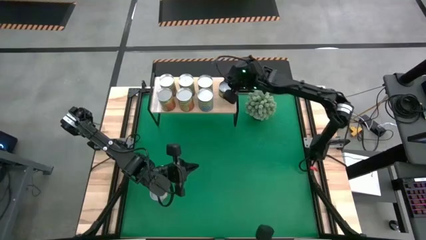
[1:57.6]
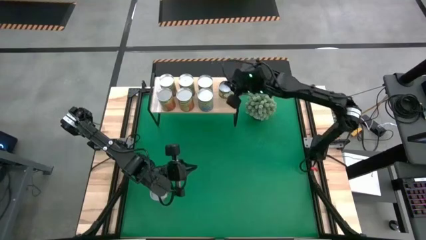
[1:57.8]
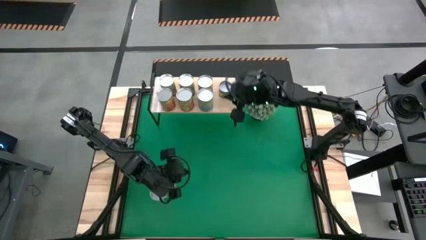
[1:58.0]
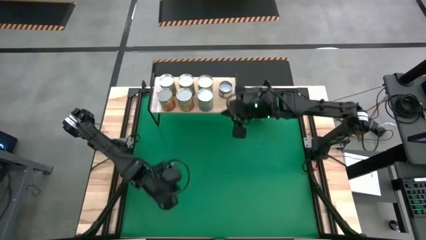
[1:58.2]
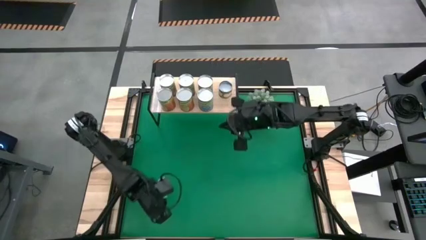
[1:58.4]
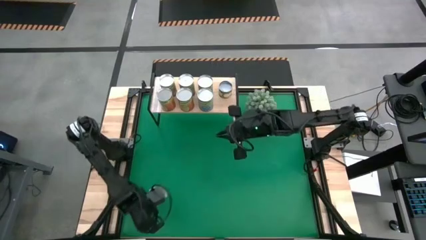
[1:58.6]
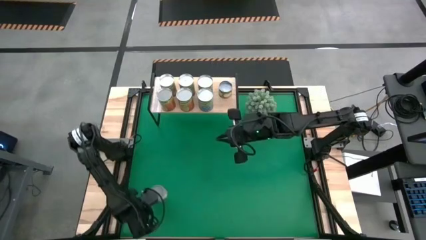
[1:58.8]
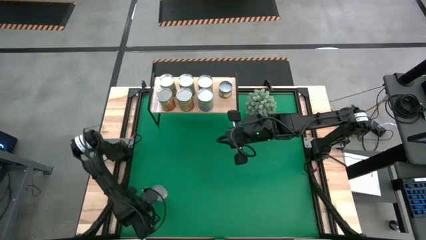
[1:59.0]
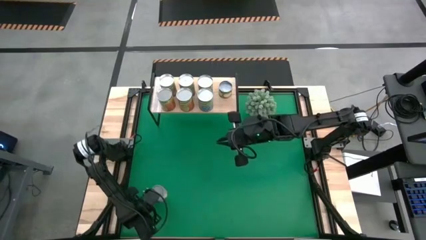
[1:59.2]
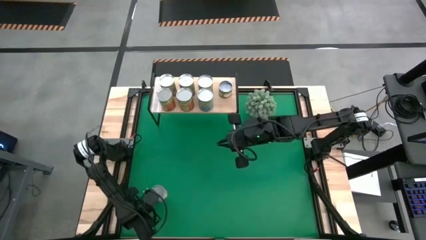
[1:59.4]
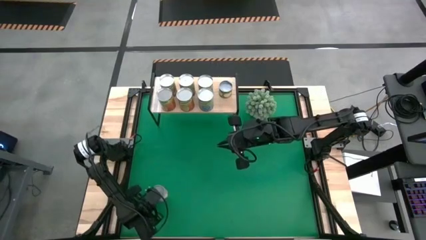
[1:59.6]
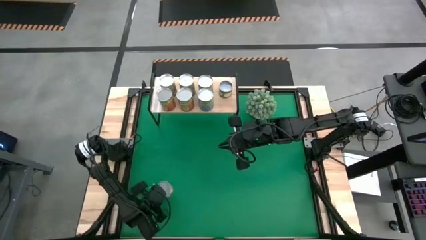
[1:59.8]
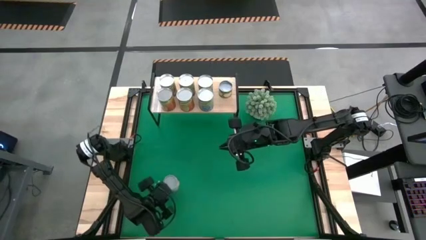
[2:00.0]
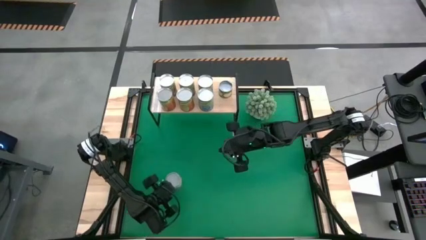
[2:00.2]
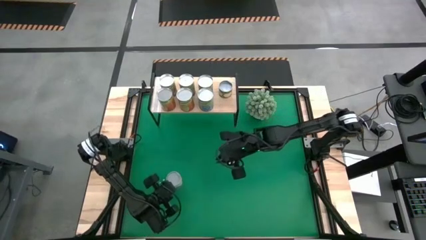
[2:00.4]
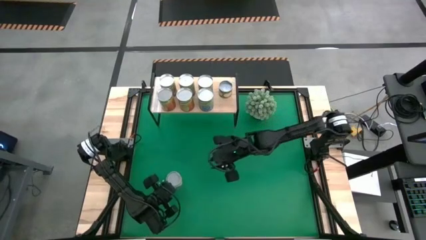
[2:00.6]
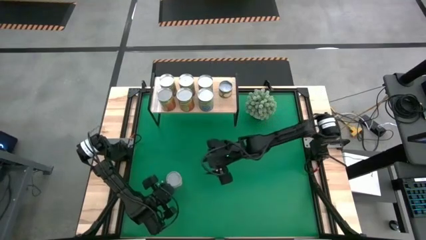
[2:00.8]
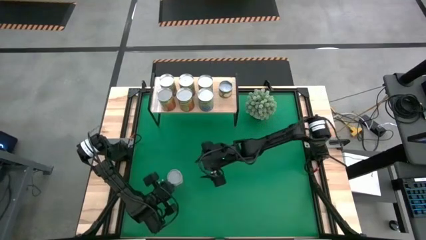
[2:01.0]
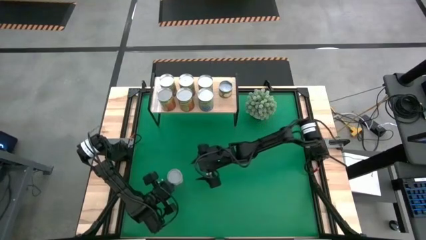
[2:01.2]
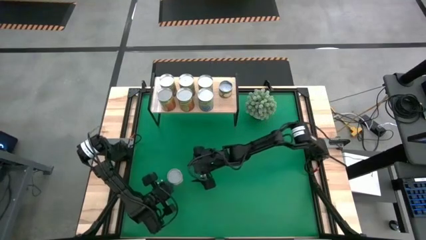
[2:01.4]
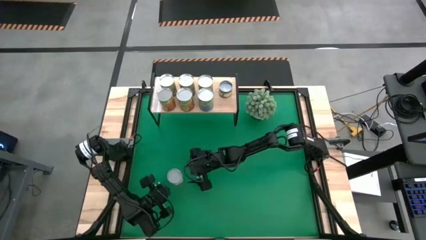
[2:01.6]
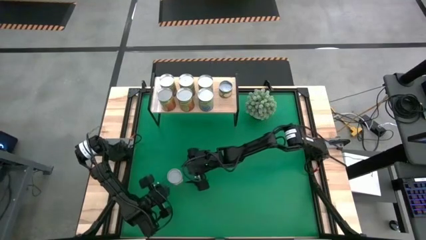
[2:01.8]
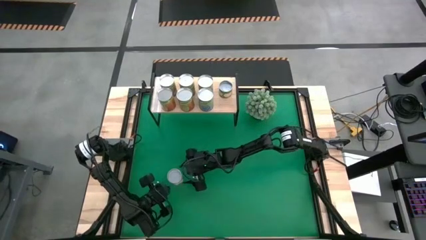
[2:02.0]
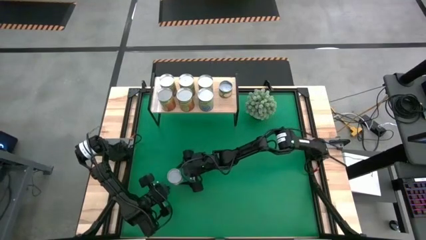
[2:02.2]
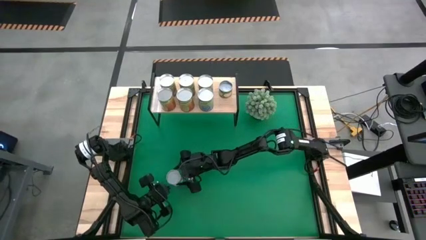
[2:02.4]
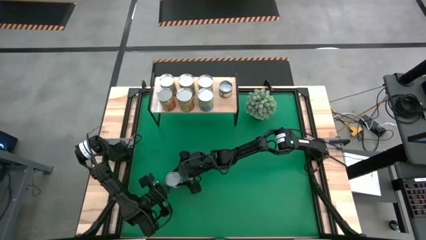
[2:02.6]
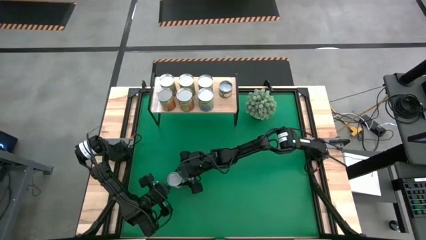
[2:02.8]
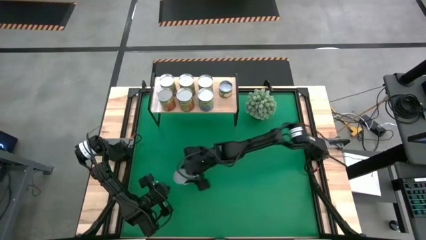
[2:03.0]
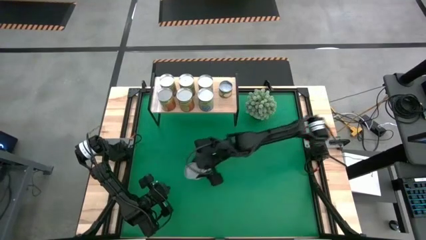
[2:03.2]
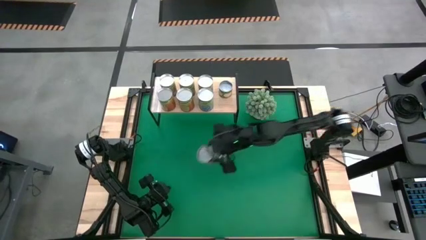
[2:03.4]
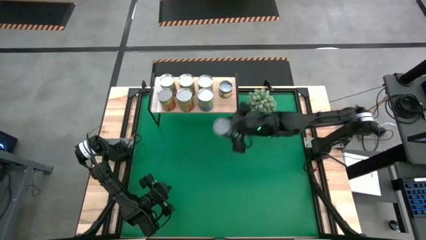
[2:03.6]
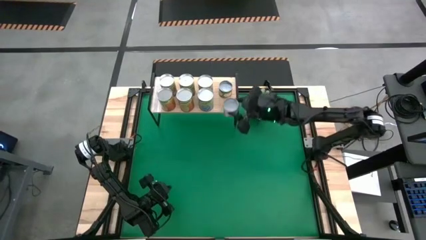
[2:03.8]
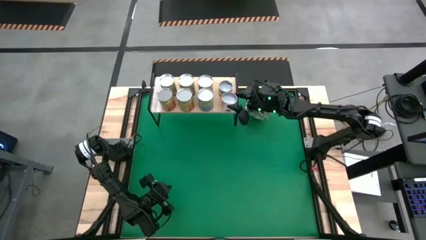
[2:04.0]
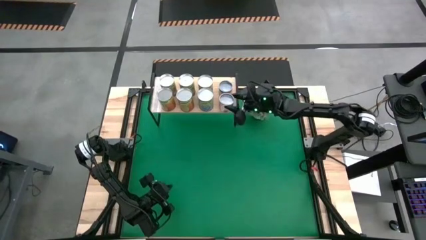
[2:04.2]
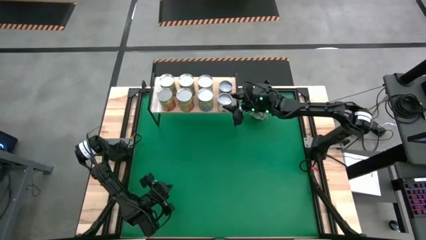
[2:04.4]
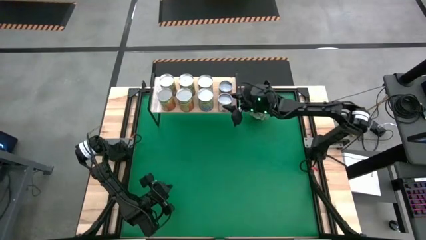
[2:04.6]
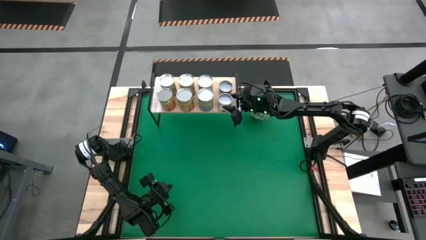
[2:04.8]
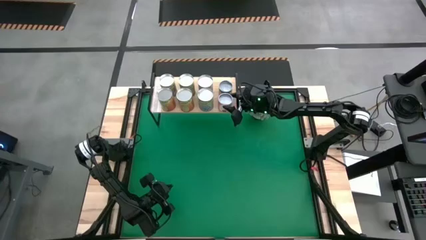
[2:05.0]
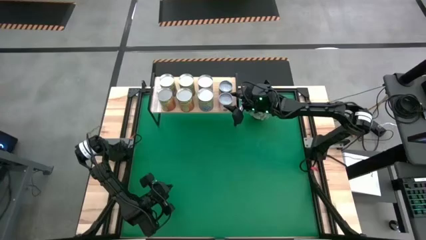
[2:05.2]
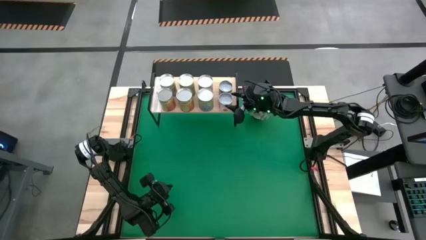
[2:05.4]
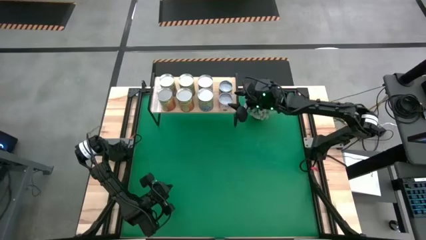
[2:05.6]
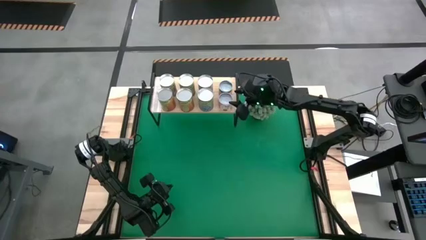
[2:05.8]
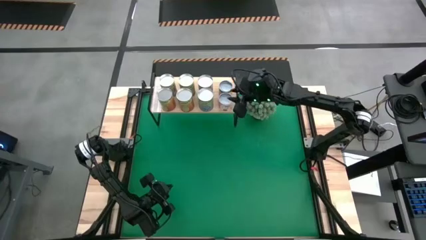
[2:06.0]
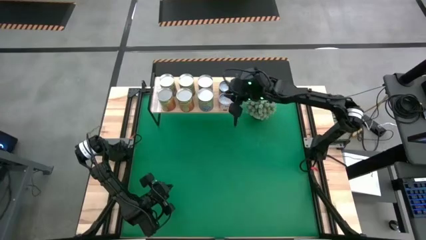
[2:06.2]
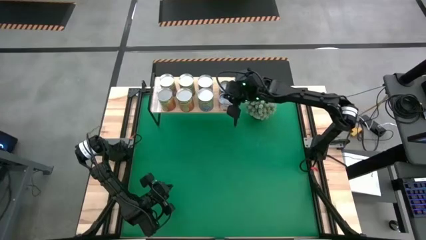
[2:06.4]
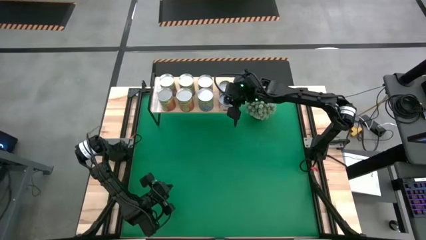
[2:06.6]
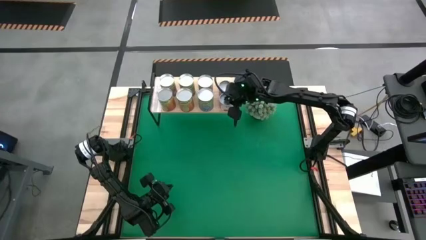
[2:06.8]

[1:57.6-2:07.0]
Task: Pick and place cans onto a shelf
Put the canned sauce on the shelf

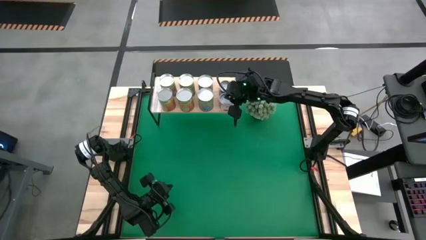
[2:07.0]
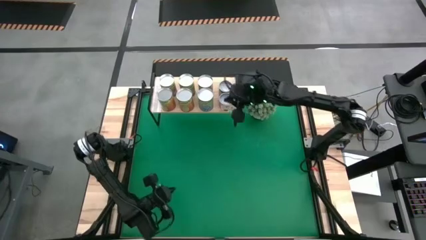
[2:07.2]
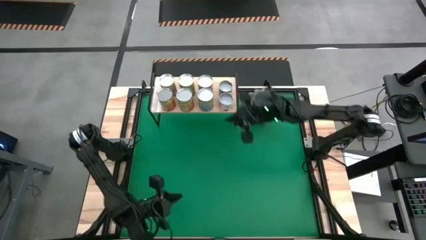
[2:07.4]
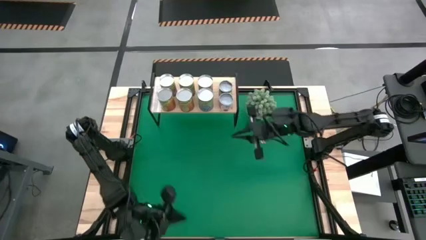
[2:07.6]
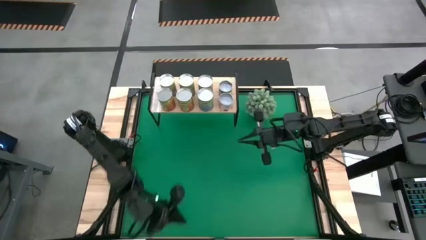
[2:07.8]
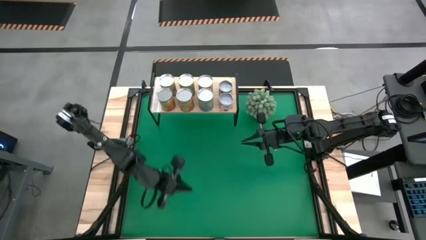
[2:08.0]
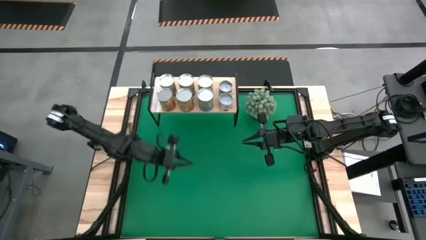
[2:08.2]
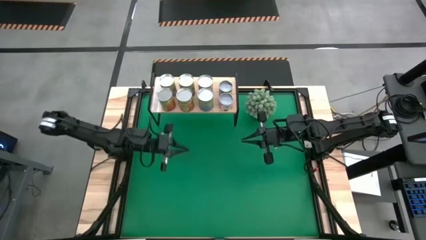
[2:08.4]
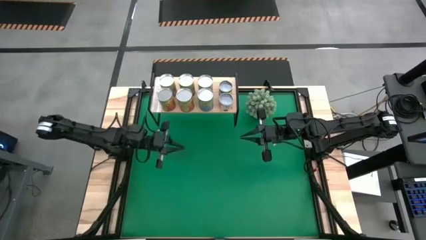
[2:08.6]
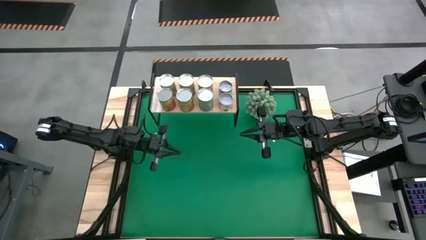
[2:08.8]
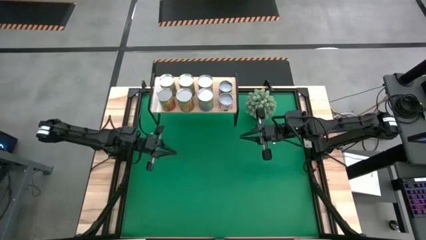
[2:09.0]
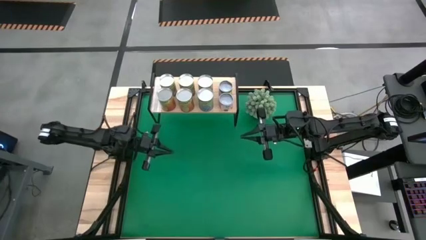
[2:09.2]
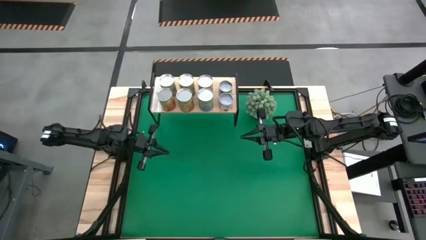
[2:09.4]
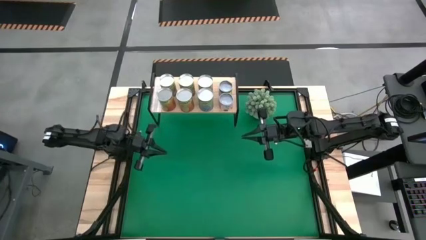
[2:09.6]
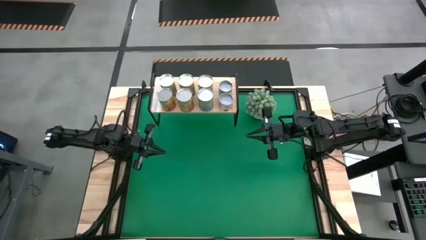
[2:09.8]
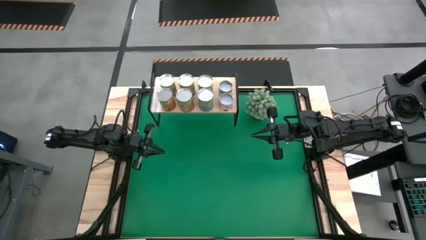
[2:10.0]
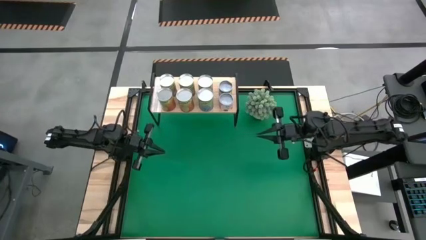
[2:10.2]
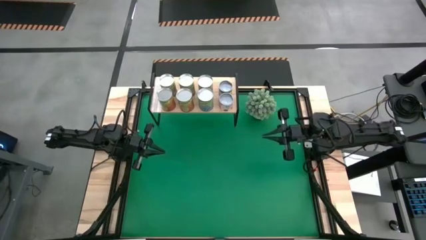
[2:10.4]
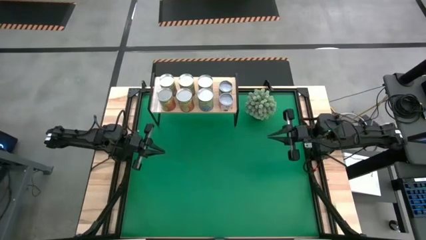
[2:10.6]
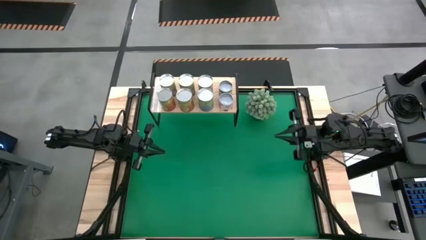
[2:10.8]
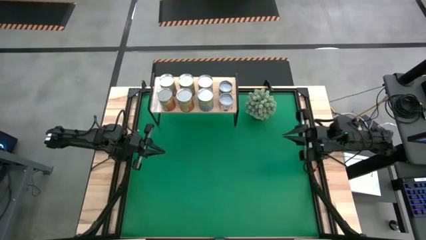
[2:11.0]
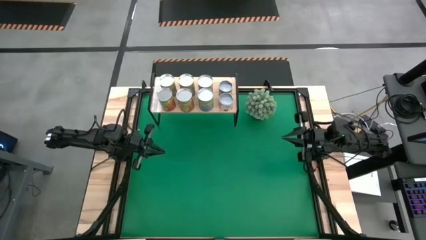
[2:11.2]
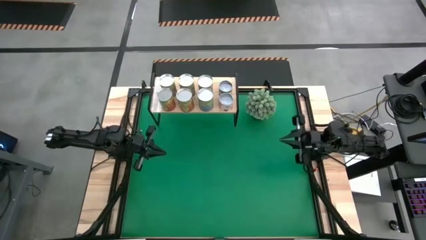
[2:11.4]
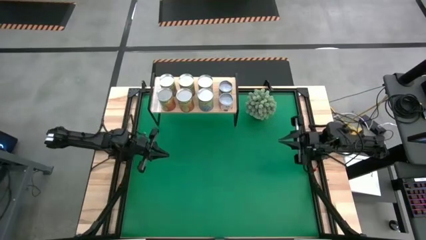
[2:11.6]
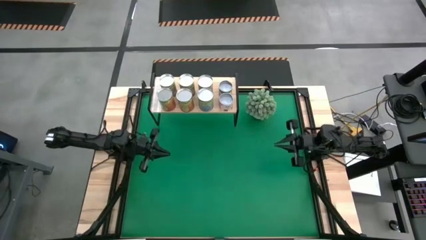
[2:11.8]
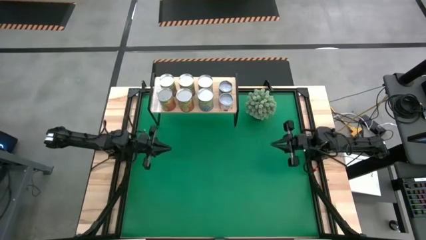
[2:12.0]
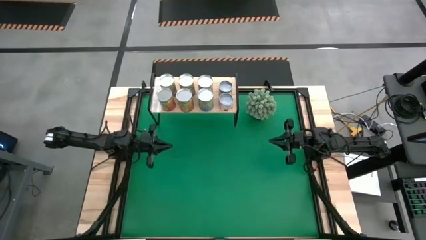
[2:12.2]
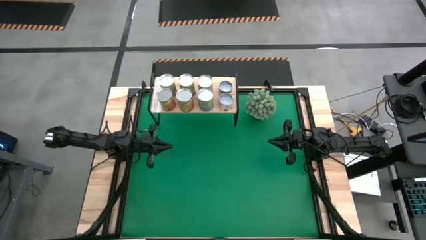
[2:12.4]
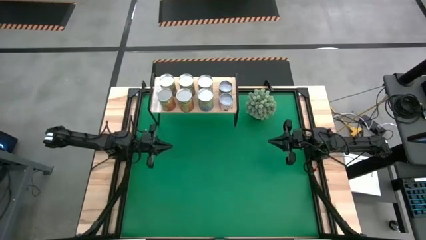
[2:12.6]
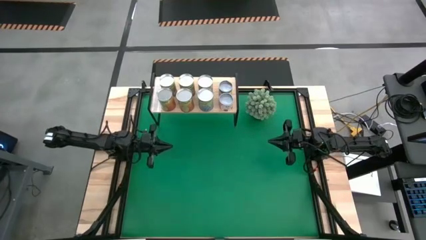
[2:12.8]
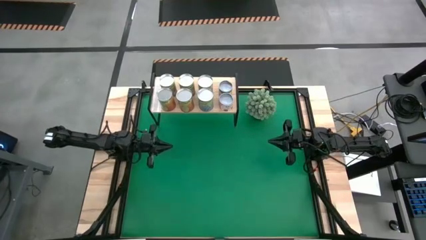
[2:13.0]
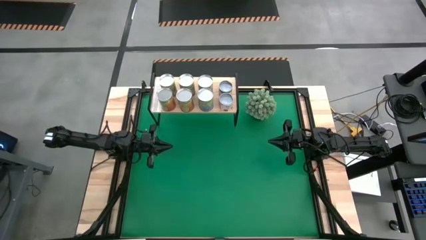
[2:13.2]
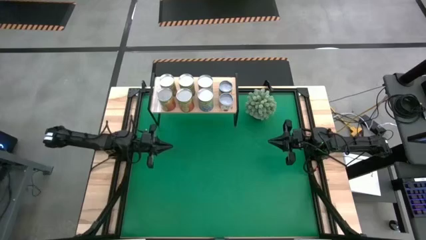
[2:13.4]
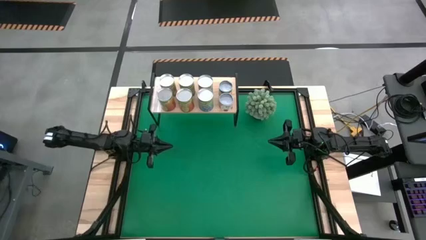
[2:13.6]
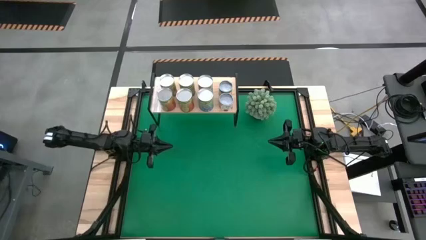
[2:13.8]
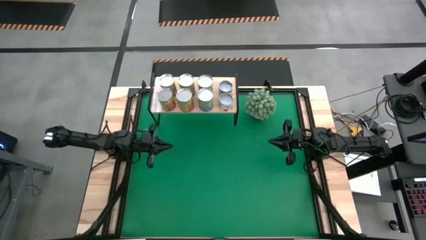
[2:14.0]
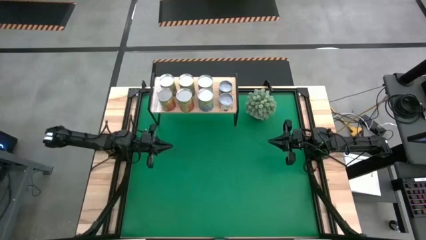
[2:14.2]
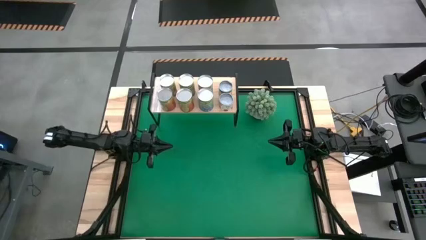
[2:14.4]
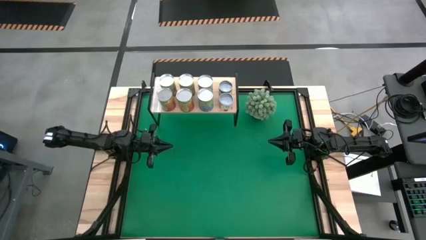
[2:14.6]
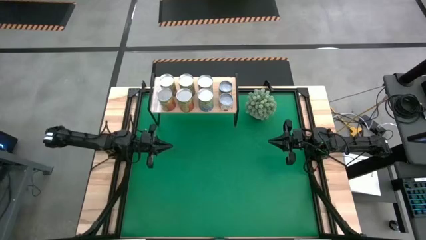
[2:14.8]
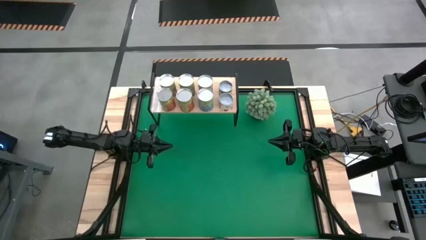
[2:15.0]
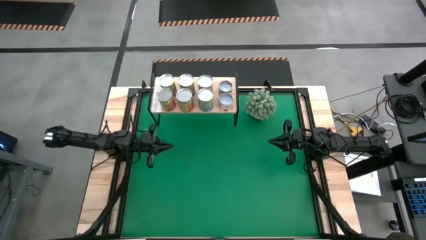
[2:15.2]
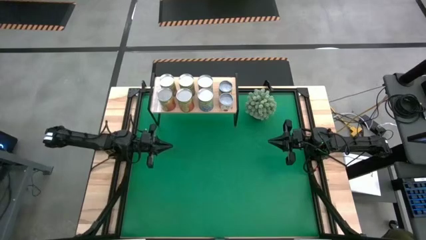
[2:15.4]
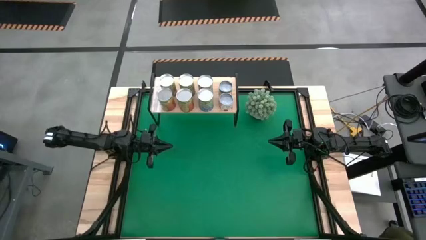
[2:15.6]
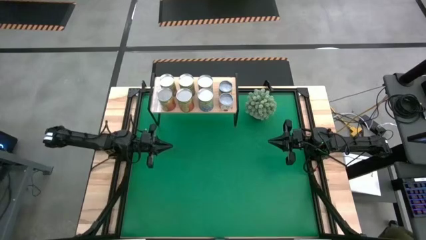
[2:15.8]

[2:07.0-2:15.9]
Return to Home Position
